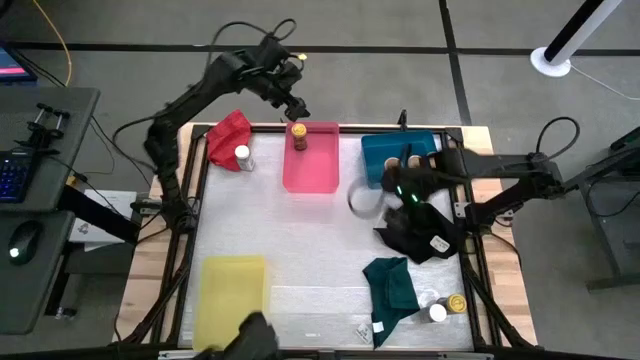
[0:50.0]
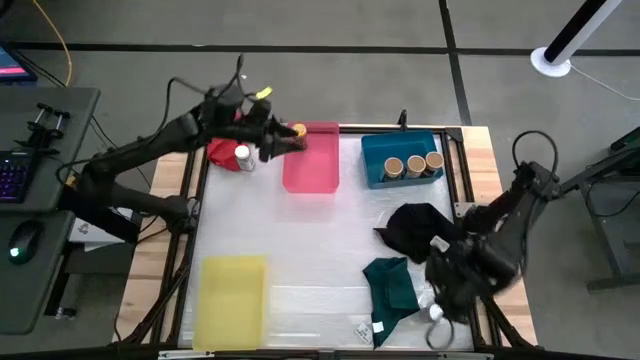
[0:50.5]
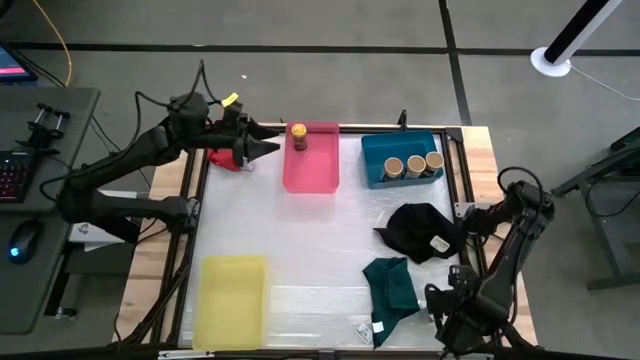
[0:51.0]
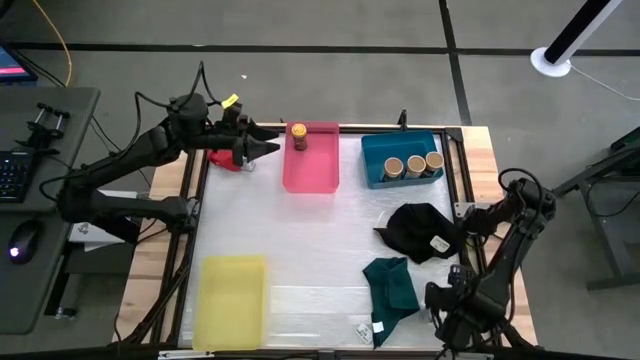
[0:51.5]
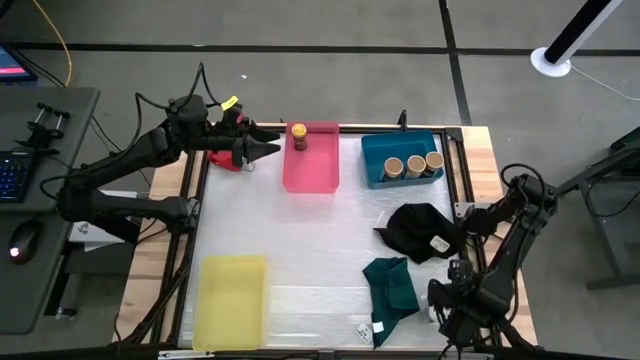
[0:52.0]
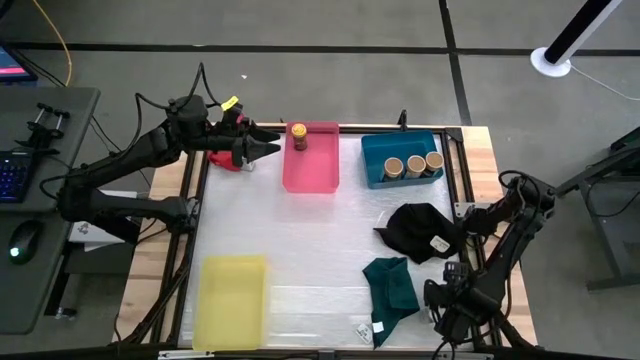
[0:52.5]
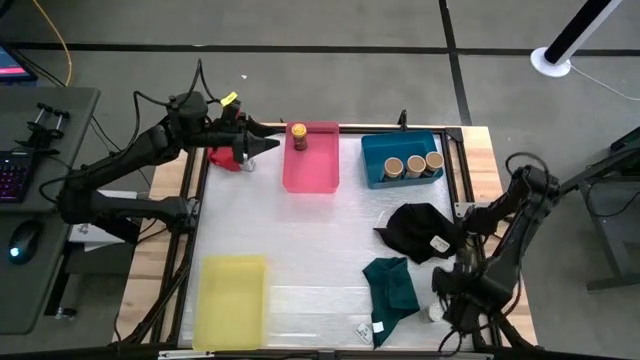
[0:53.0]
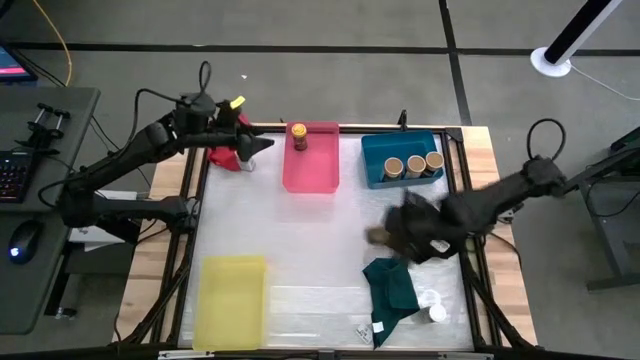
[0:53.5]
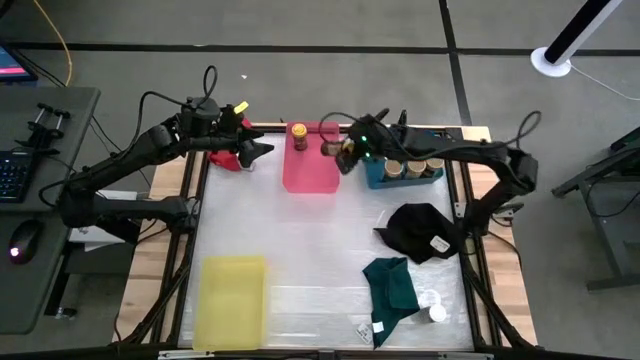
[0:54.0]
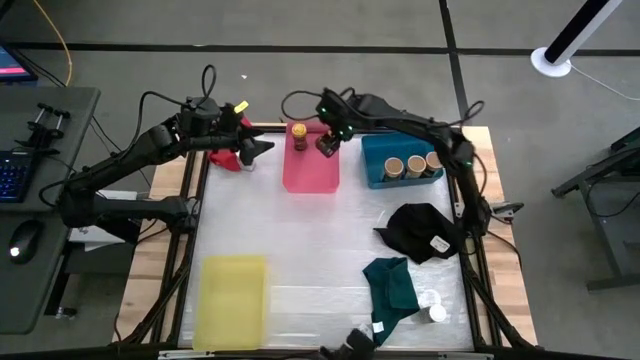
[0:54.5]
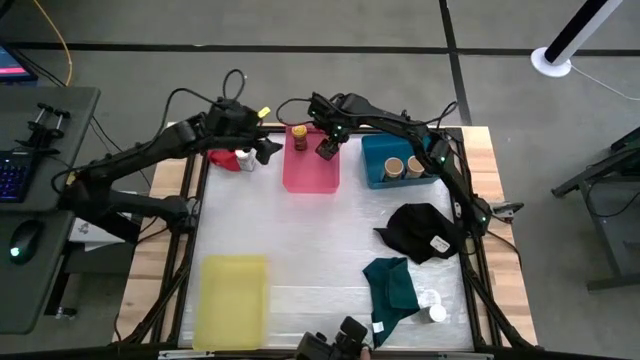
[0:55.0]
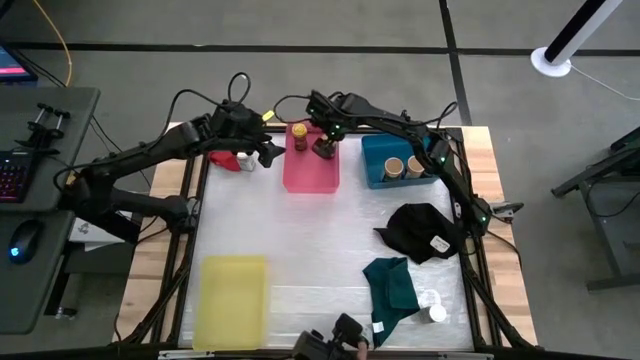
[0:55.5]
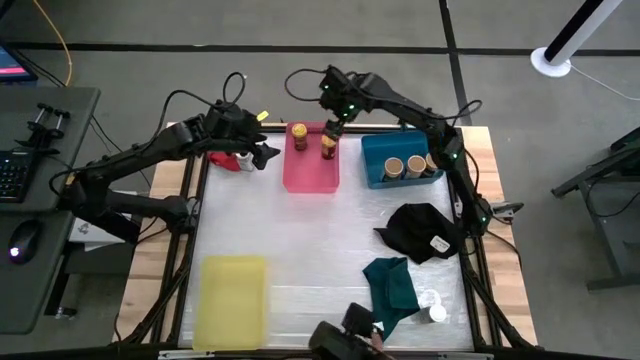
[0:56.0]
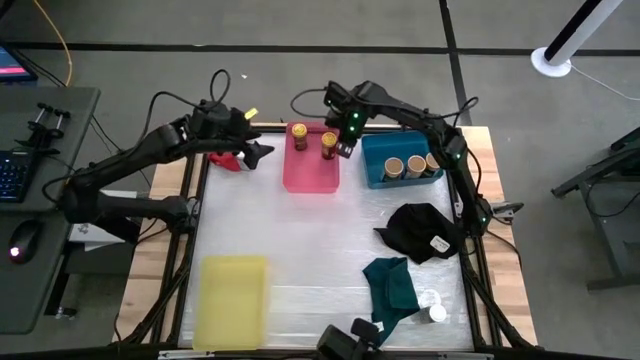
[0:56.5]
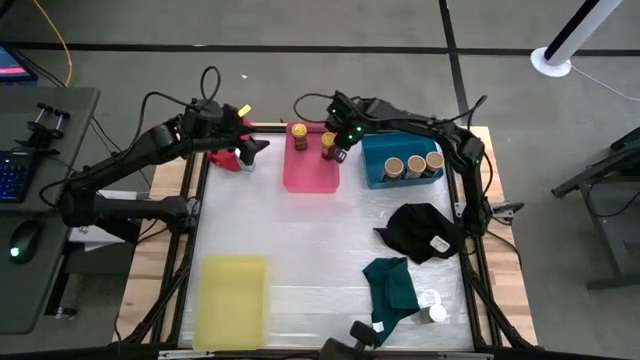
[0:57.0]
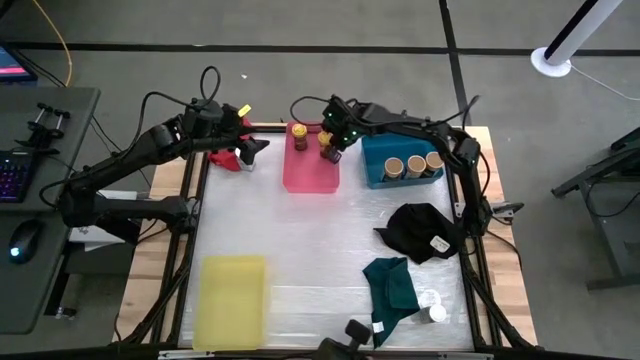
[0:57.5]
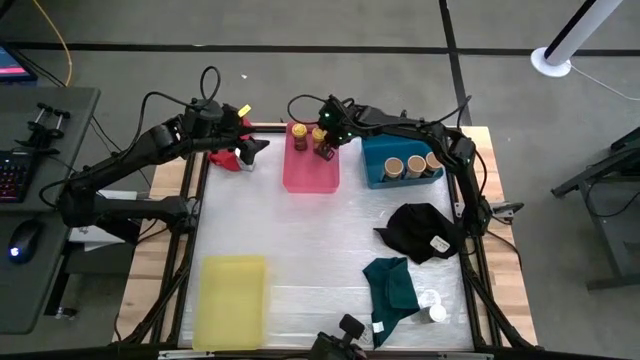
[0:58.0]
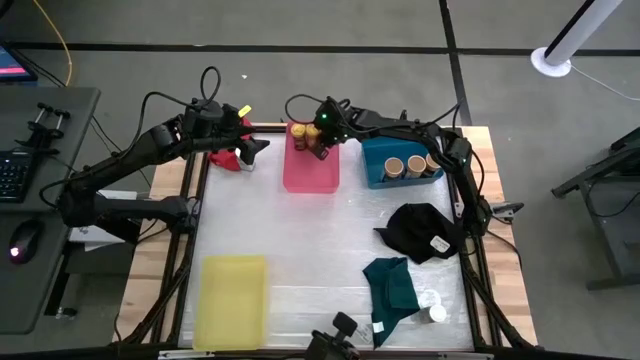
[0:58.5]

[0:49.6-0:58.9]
Task: Sort spices by type
Put the yellow seasoning bottle into the pink bin

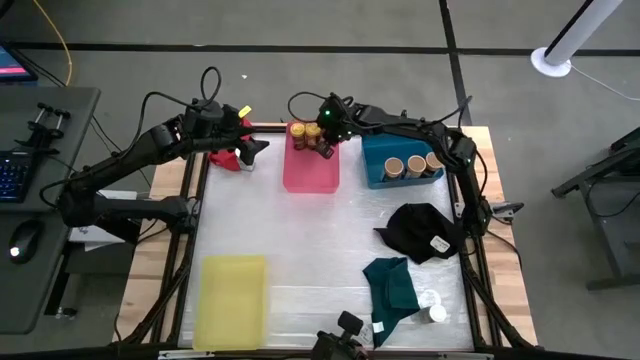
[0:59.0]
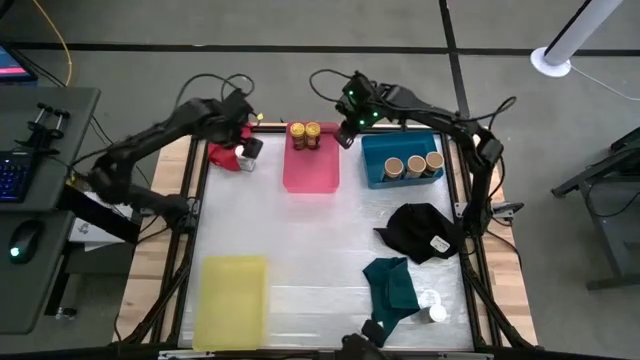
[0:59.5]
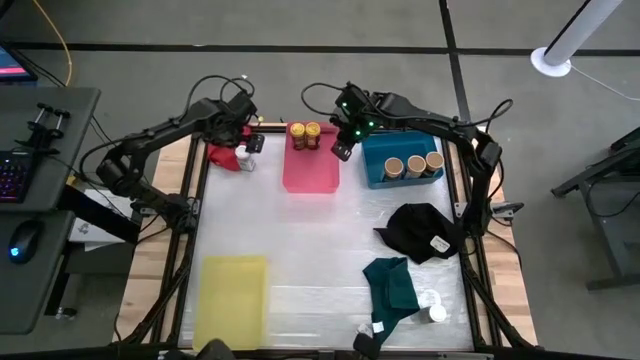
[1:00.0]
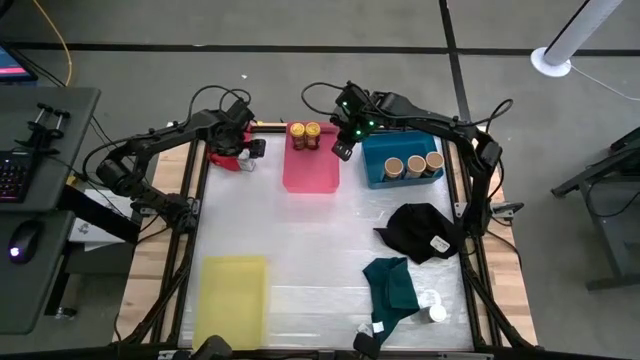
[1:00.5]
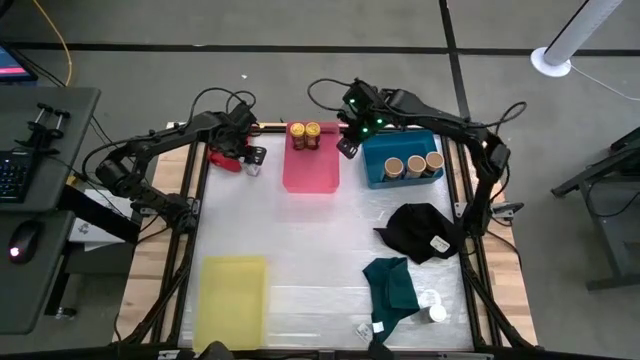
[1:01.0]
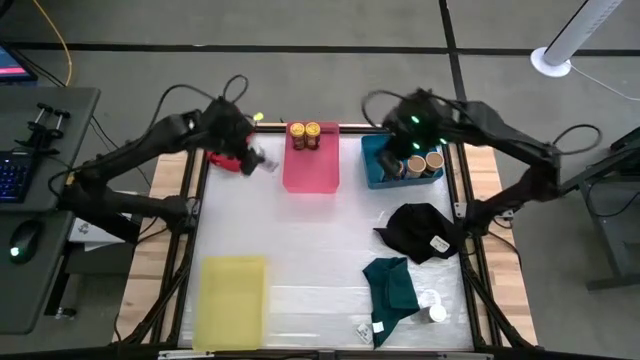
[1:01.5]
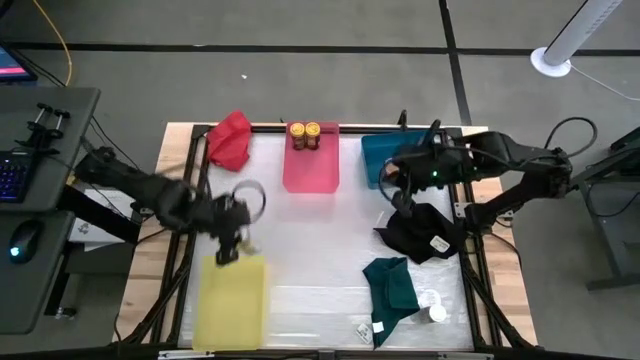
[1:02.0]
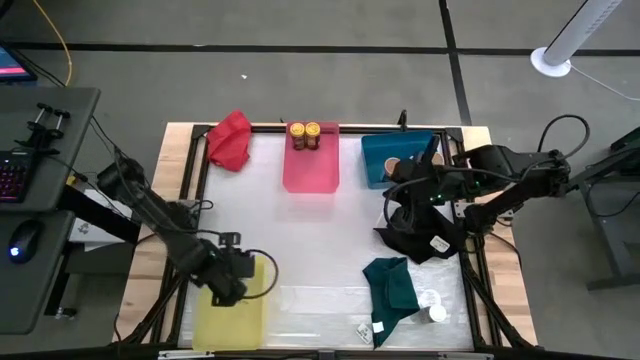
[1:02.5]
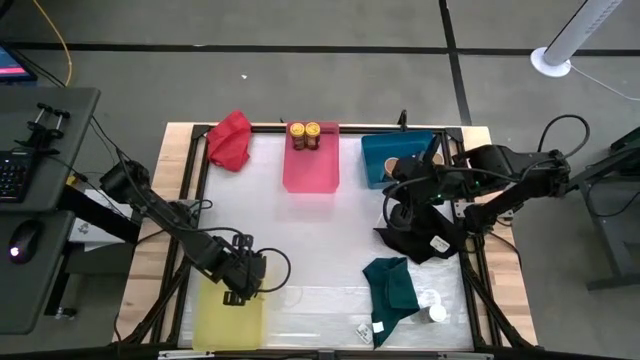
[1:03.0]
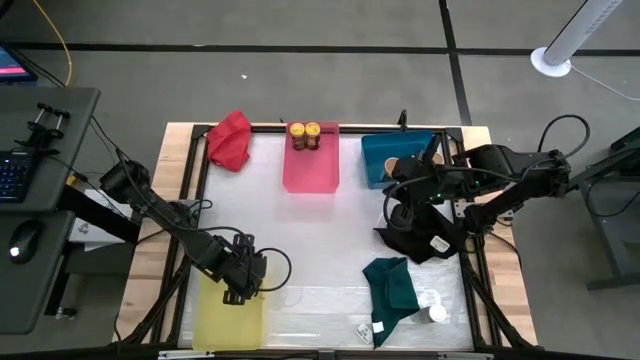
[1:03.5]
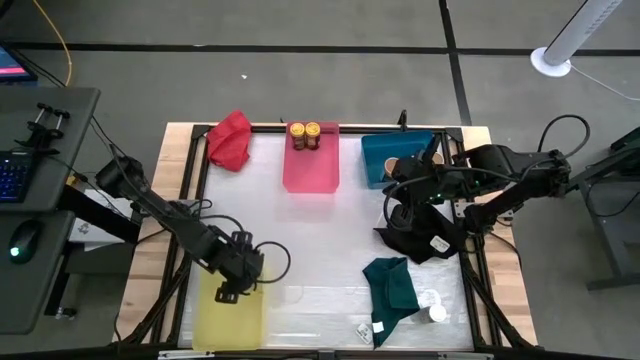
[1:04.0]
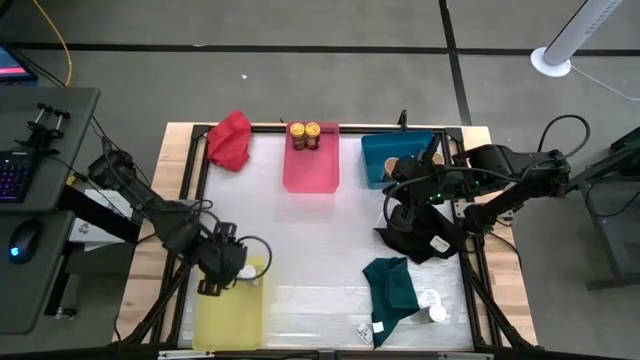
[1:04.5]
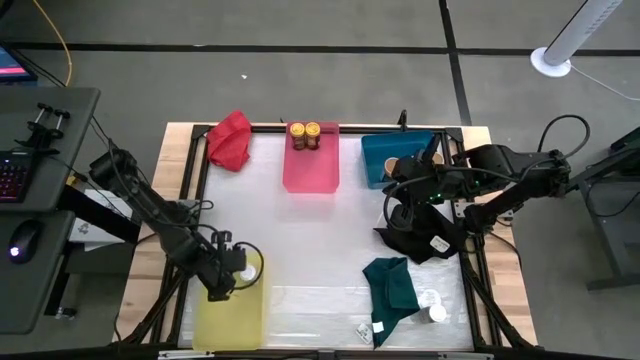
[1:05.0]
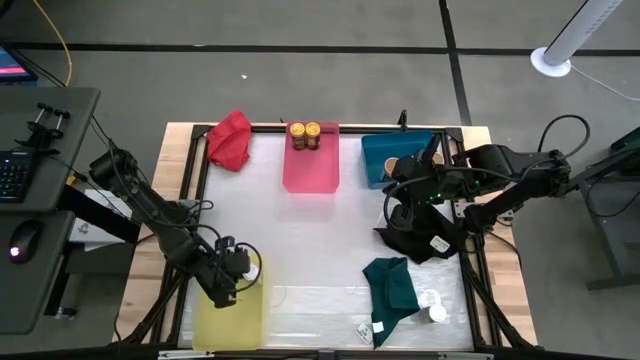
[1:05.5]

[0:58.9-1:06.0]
Put the top white seasoning bottle into the yellow bin

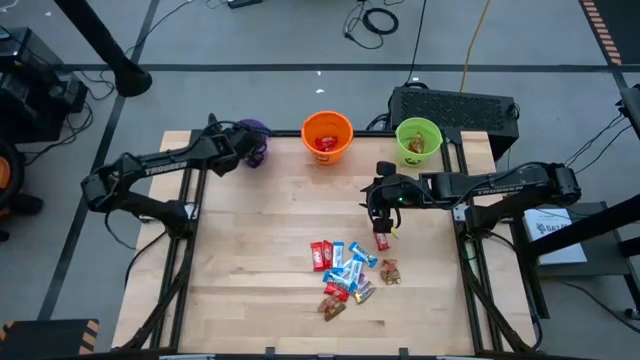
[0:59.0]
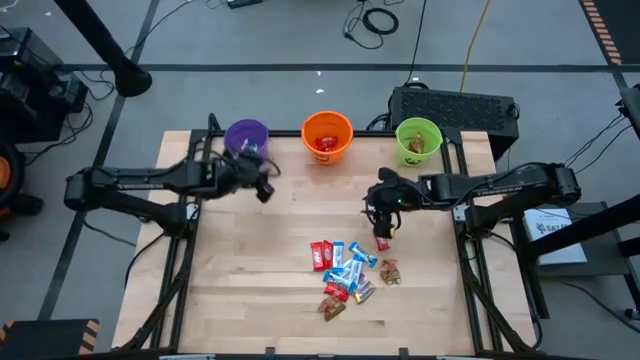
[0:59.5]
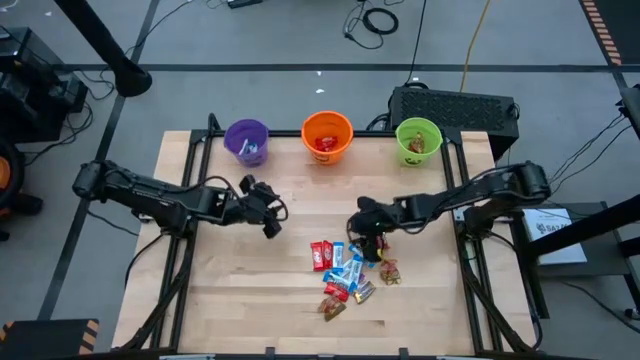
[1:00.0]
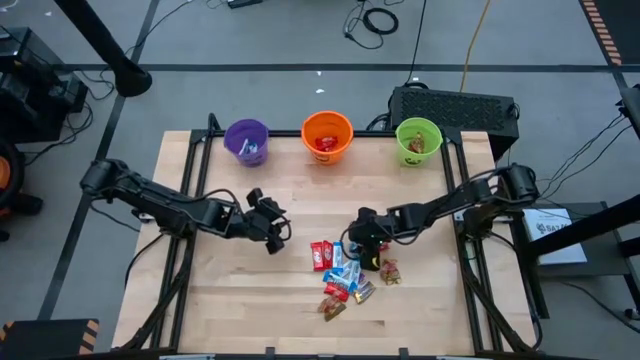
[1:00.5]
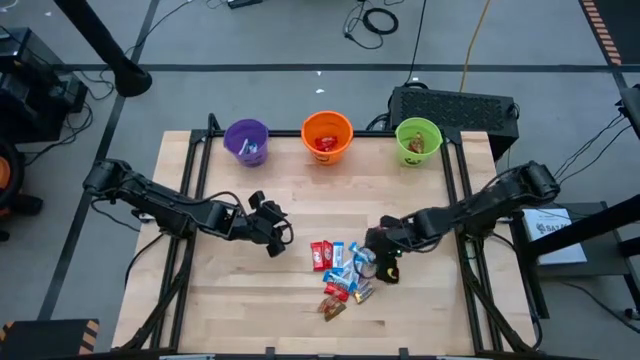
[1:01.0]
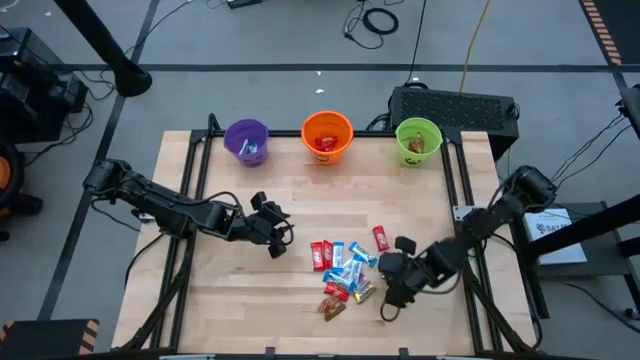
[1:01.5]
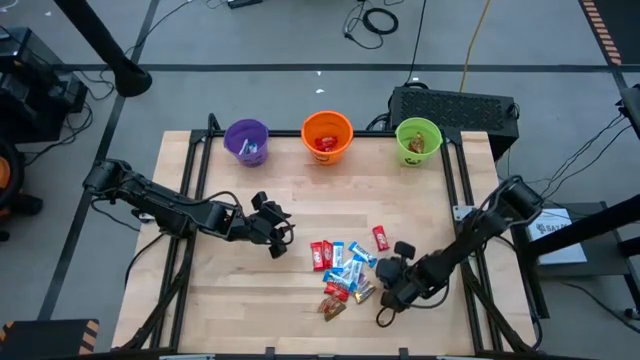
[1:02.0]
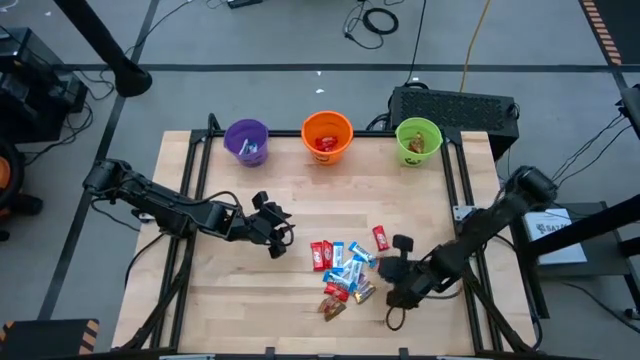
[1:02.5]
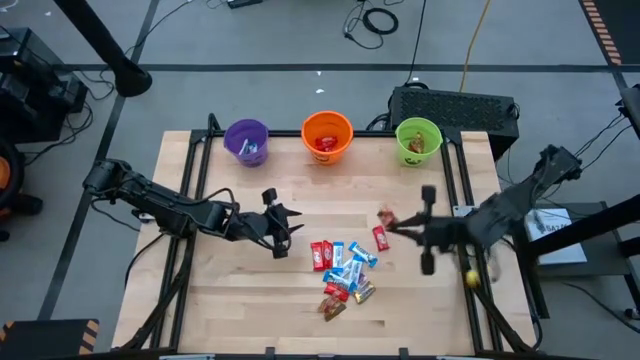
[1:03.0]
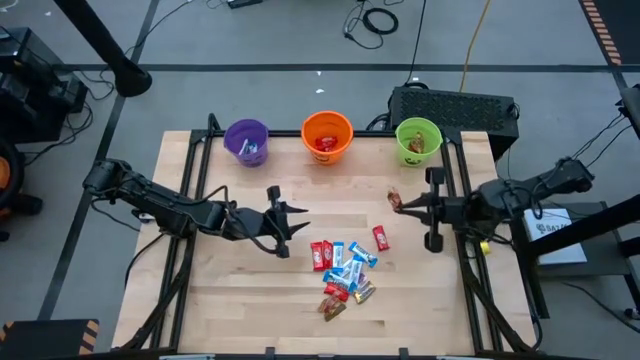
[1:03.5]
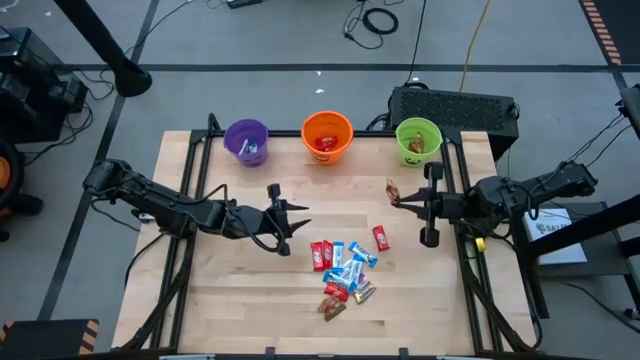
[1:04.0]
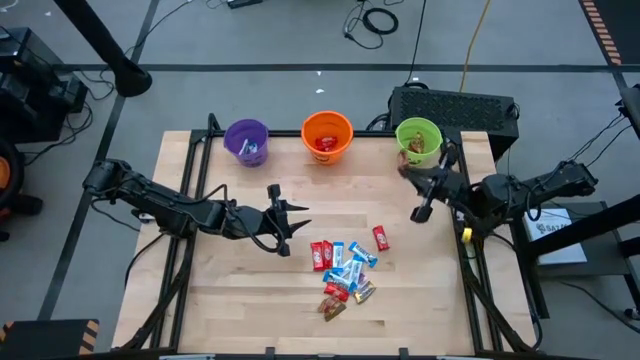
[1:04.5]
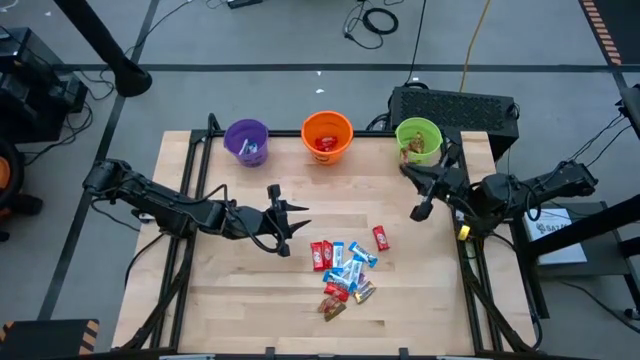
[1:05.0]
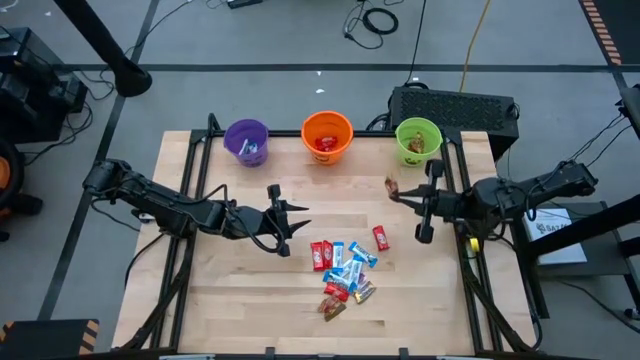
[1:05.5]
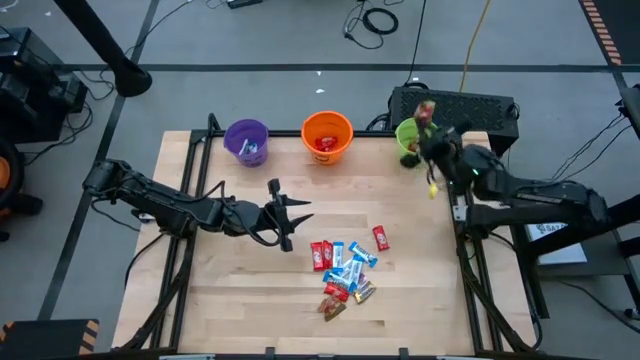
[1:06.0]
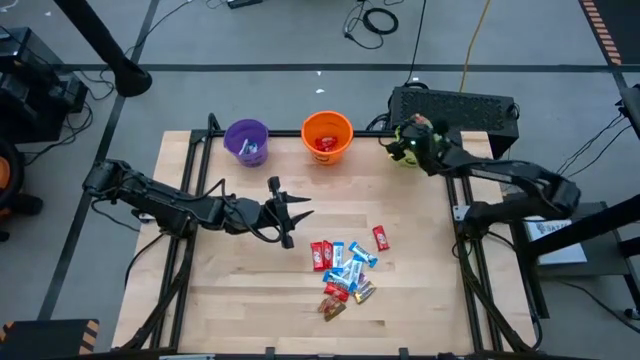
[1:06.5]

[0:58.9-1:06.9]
Task: Sort candy by brand, put in halloween buckets
Put the brown gummy into the green bucket
